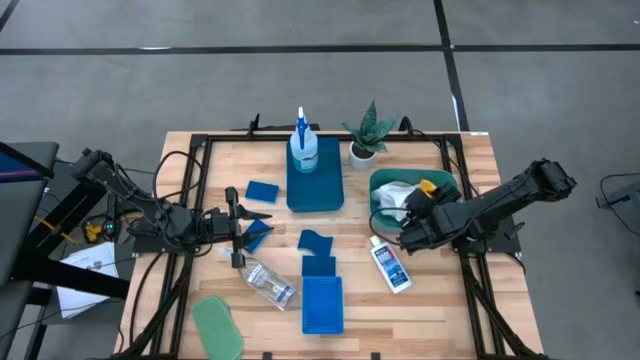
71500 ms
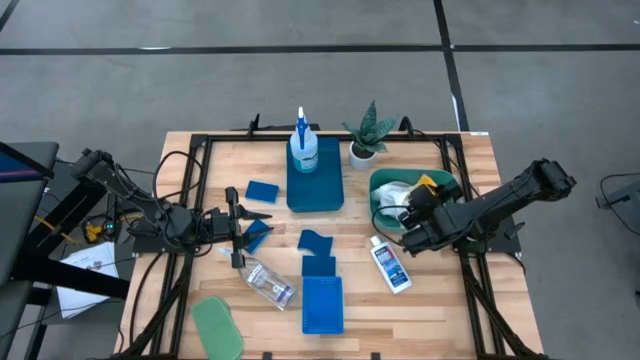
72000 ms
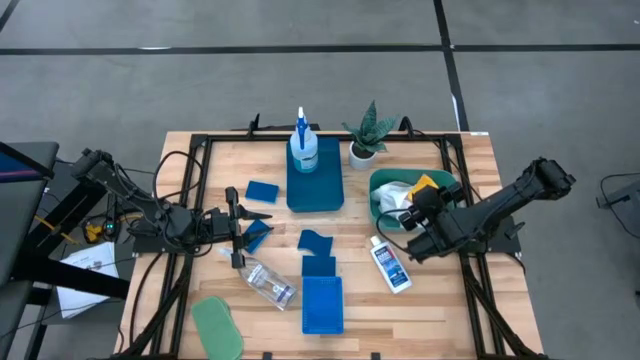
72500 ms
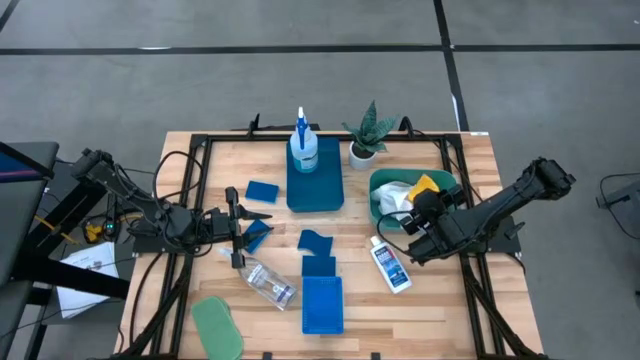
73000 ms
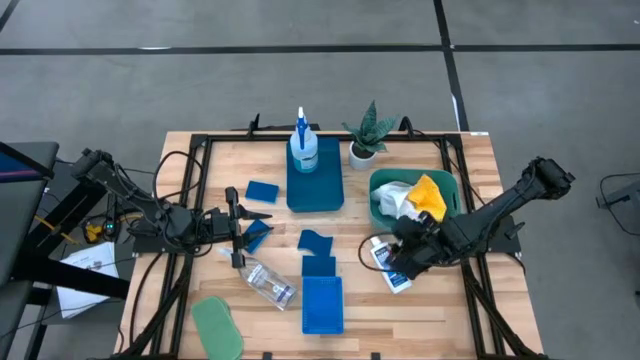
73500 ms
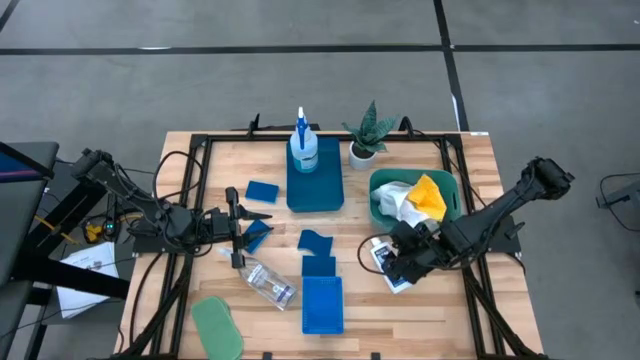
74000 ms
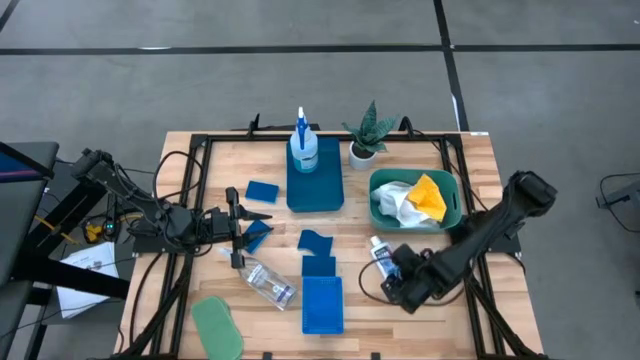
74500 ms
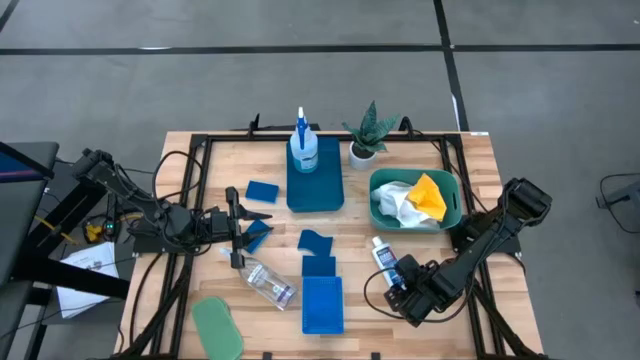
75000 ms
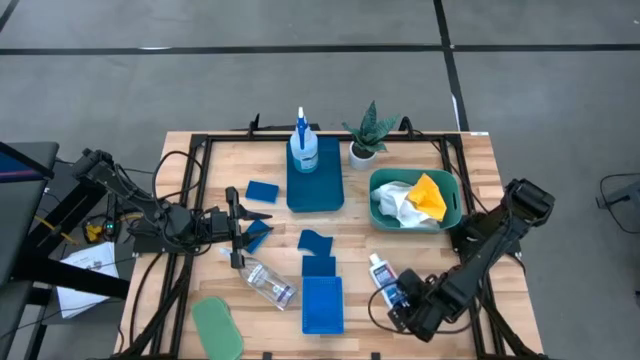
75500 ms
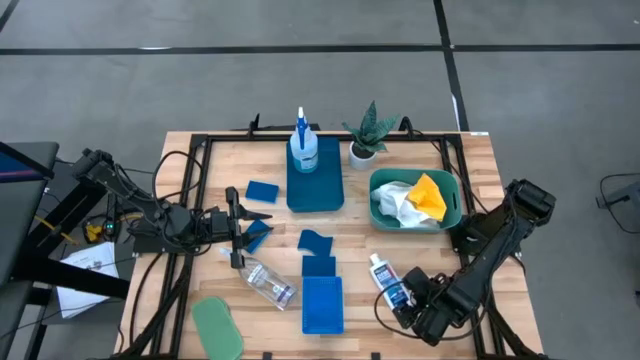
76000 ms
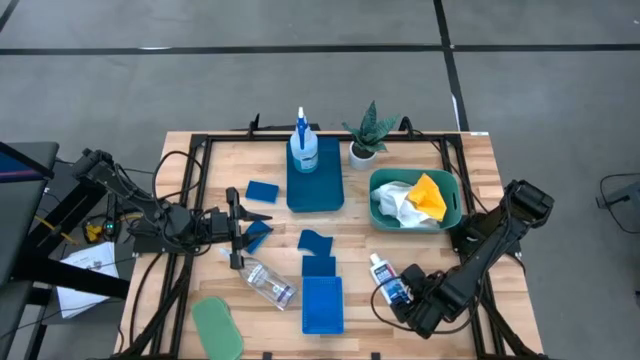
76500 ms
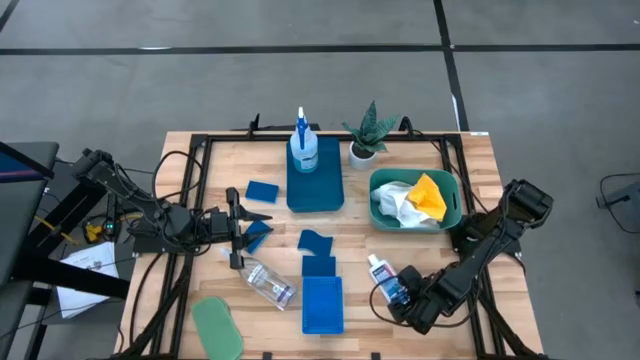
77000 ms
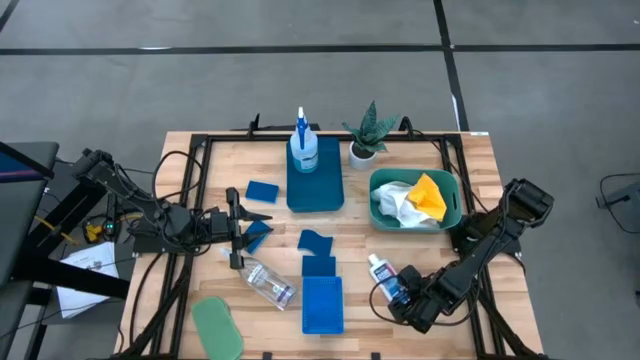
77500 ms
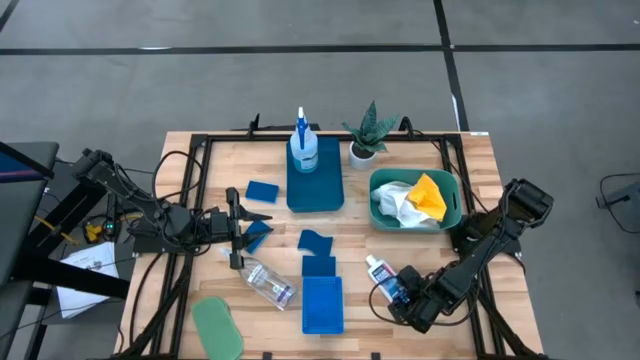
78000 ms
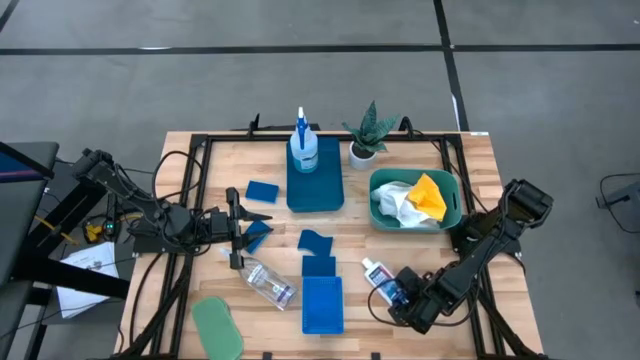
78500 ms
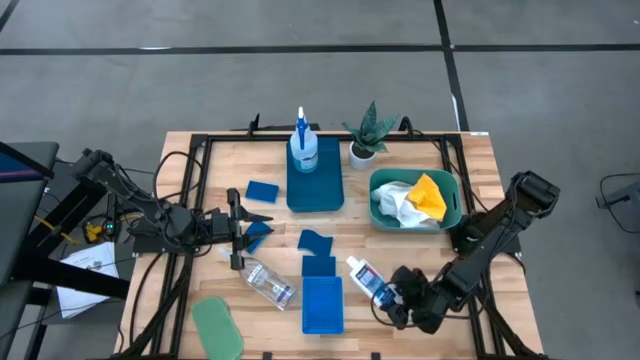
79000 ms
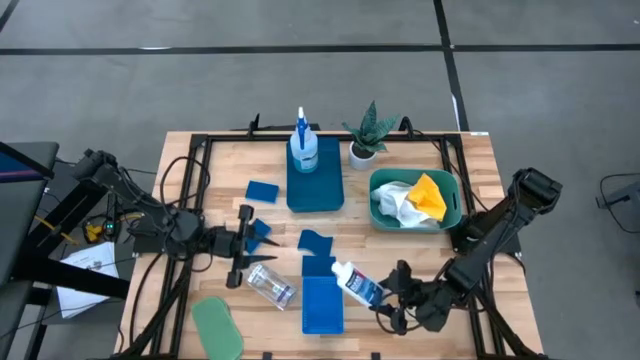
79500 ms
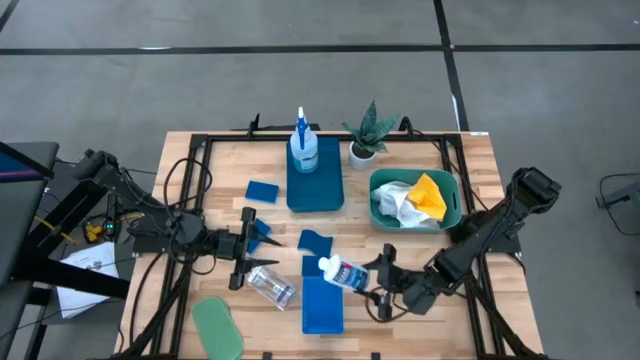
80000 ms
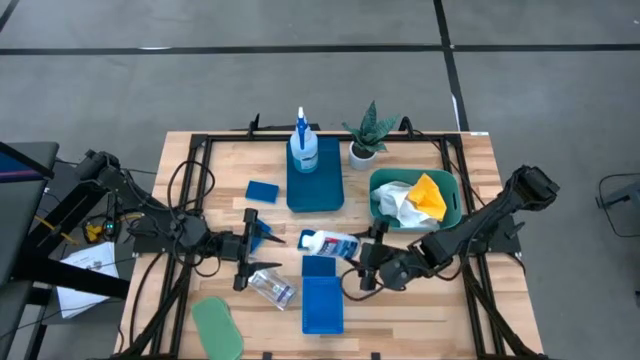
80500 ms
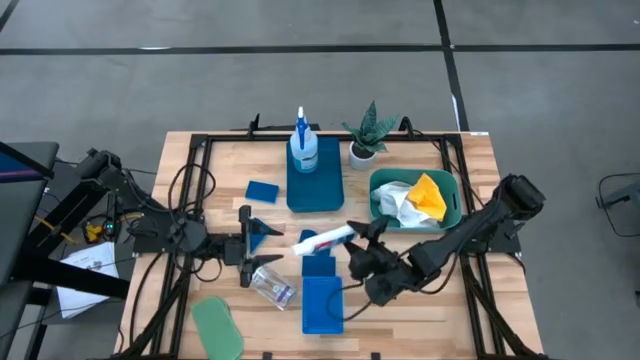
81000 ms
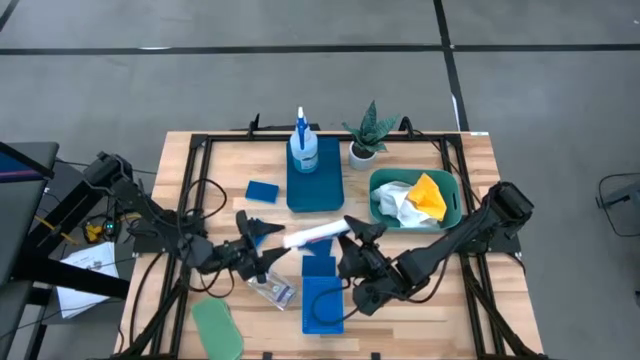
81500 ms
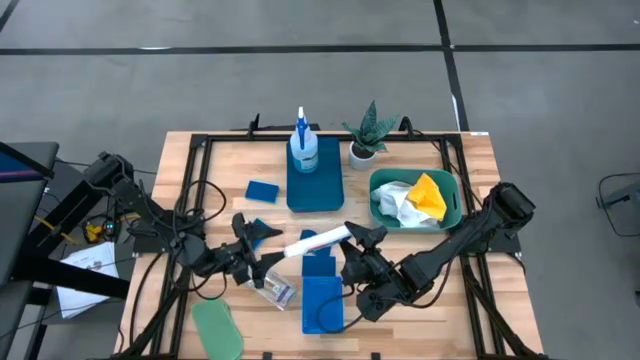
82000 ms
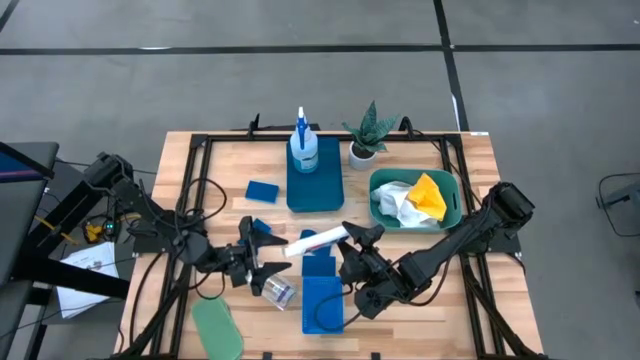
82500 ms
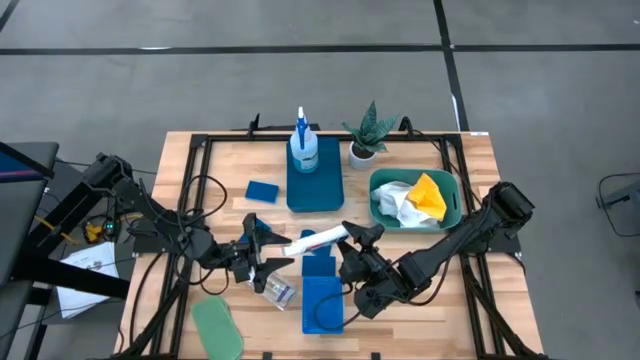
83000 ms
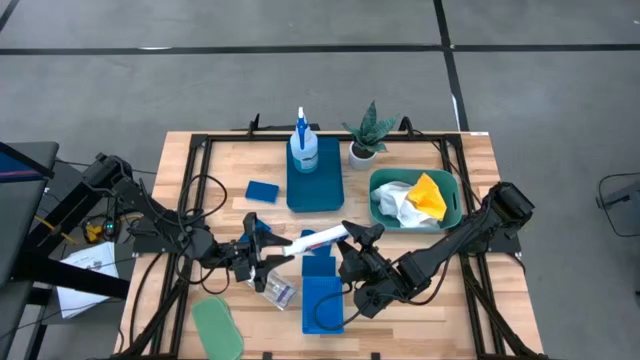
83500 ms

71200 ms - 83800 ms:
Task: Pick & Place Kitchen Items
Put the white plastic restorer bottle into the blue bin

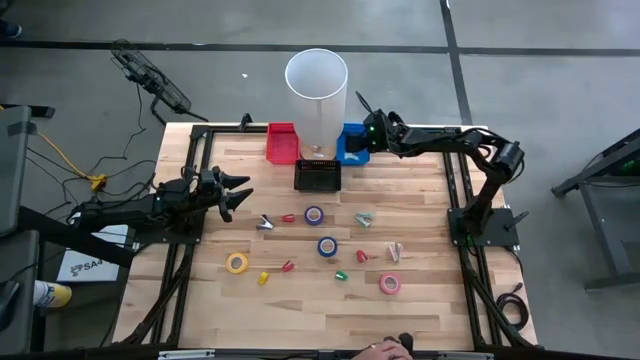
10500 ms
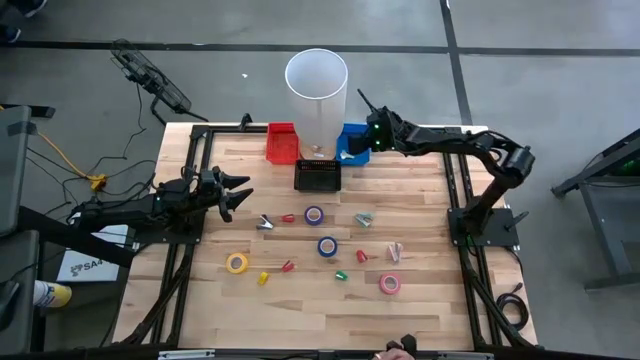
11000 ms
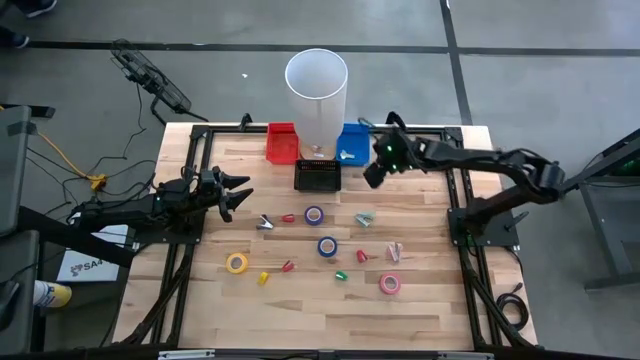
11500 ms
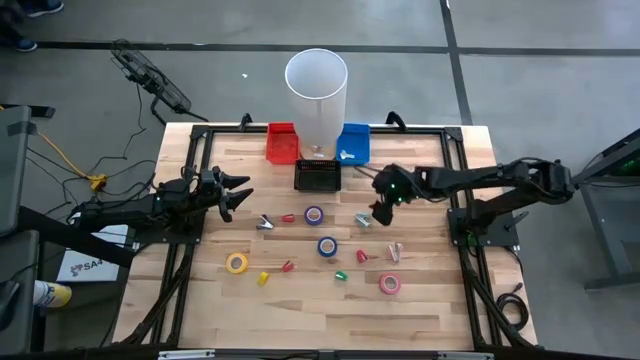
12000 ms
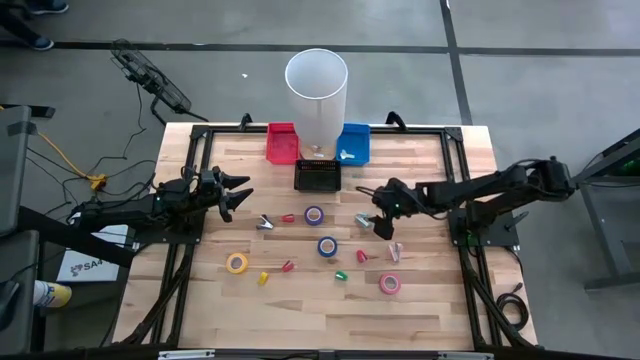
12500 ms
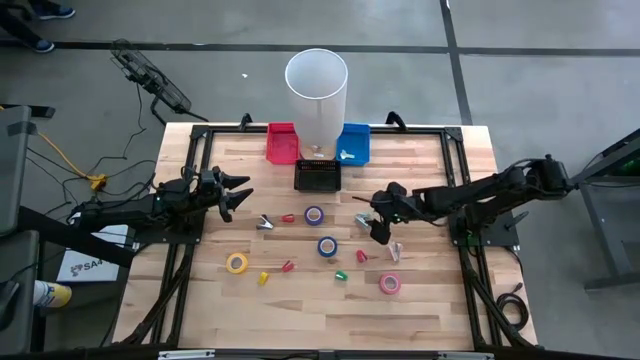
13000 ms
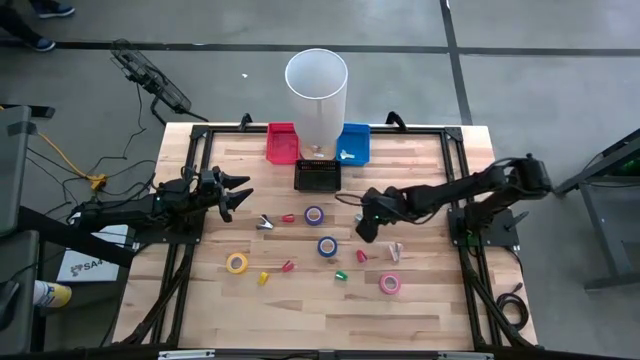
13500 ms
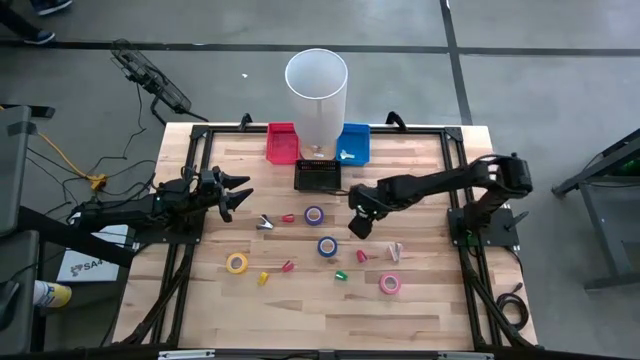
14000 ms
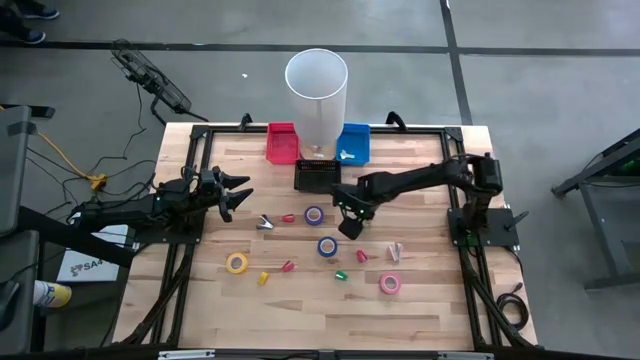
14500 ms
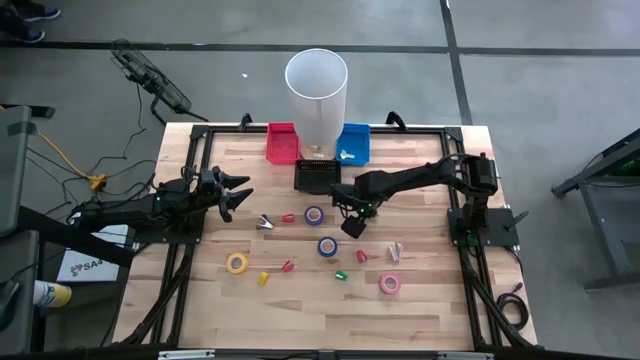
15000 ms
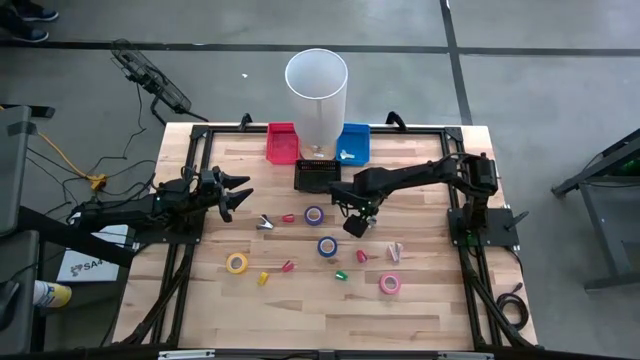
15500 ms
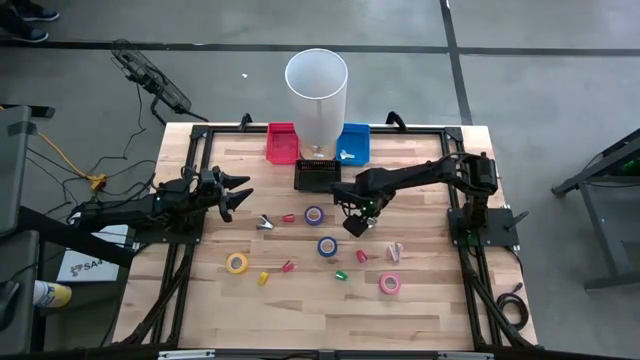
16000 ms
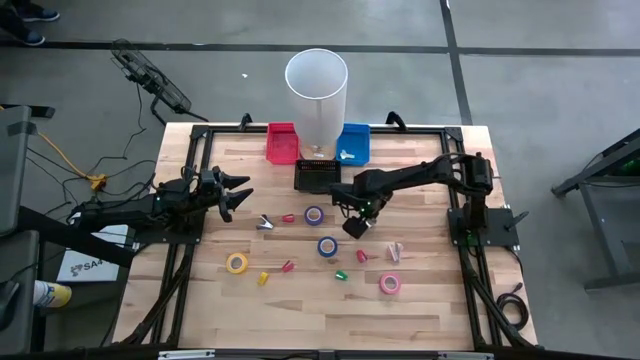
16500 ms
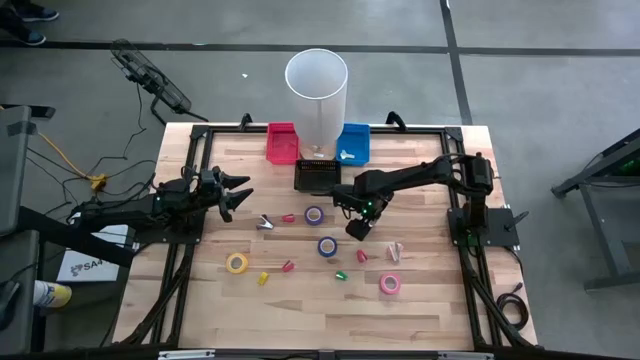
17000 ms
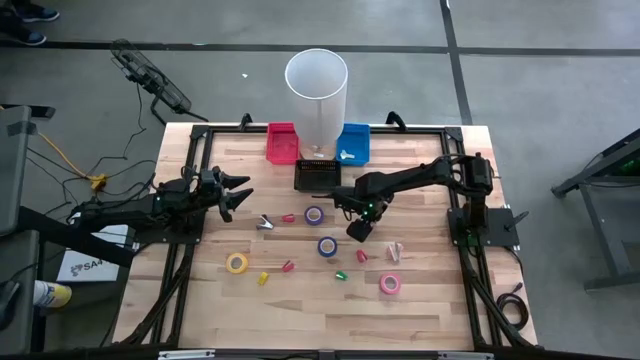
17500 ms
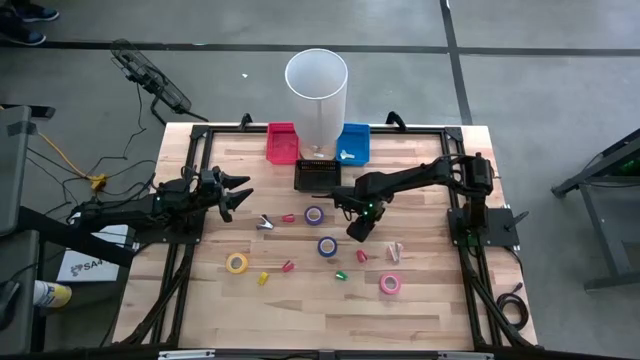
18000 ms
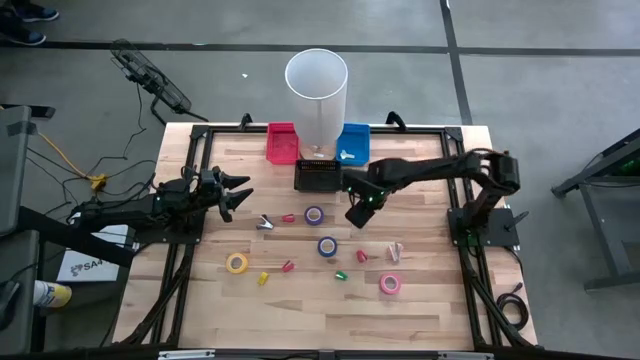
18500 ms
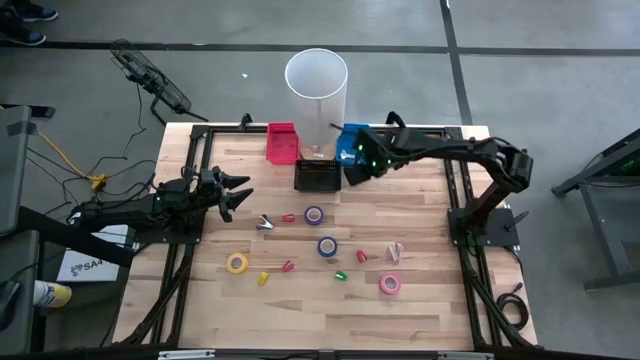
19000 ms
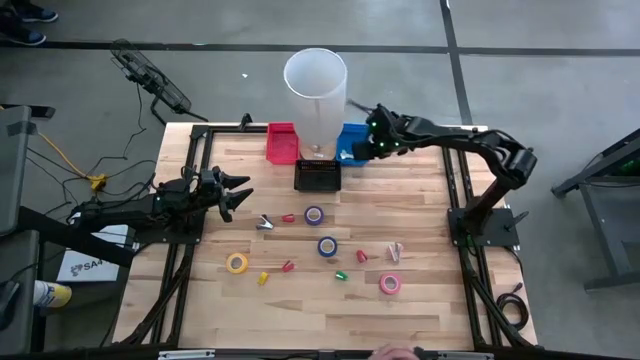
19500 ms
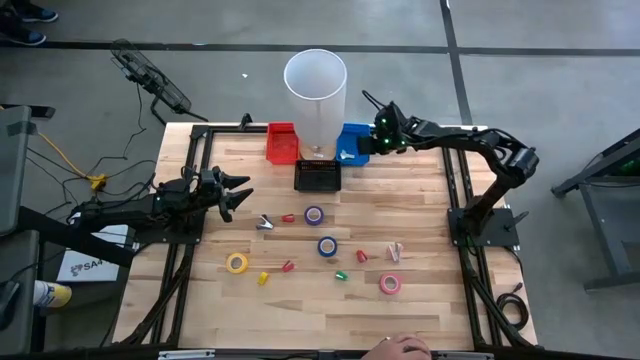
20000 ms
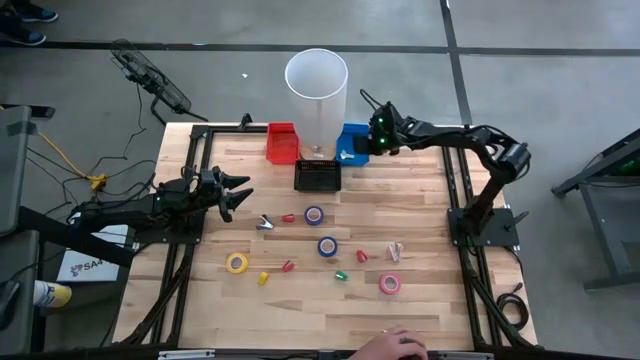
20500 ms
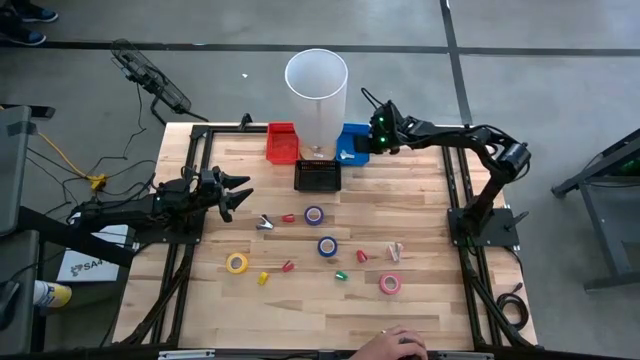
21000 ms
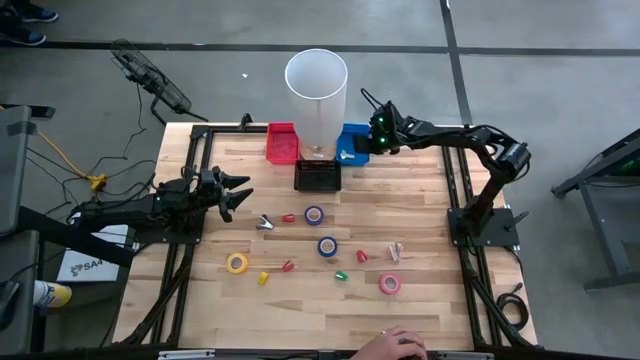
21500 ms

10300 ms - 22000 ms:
Task: Pick and place Stapler, Stapler remover, tape
Put the light blue staple remover into the blue bin
